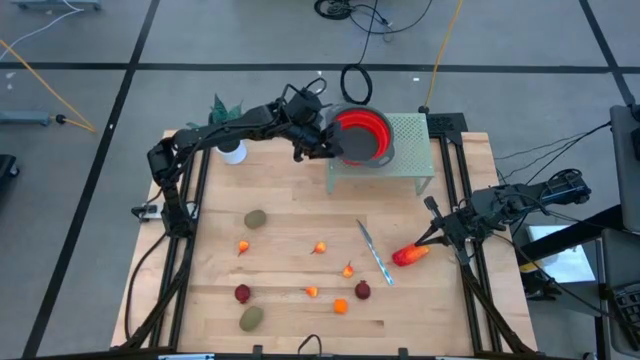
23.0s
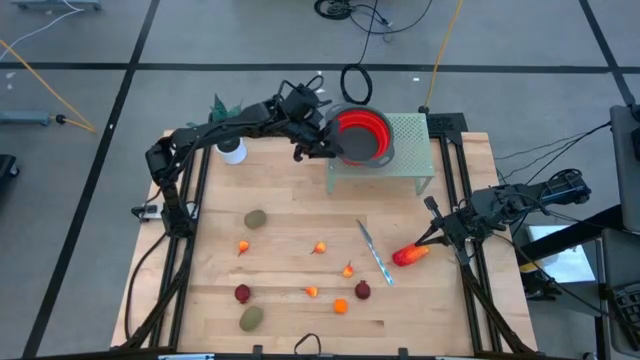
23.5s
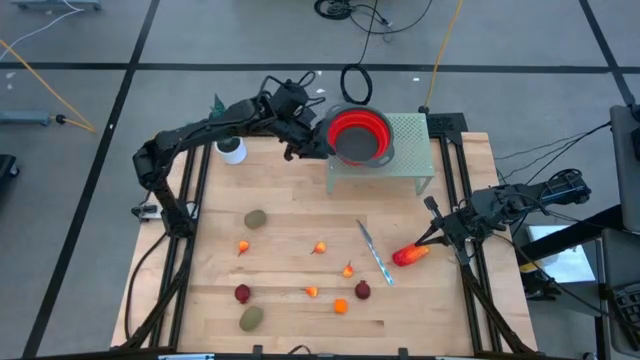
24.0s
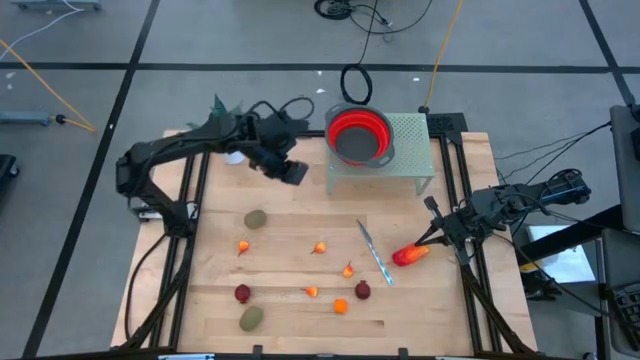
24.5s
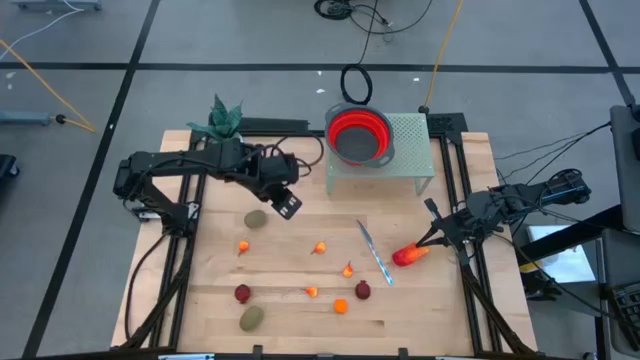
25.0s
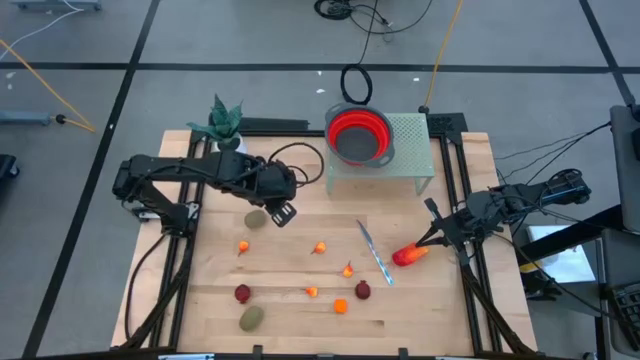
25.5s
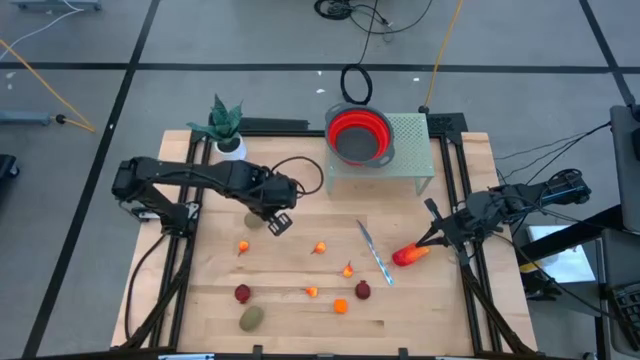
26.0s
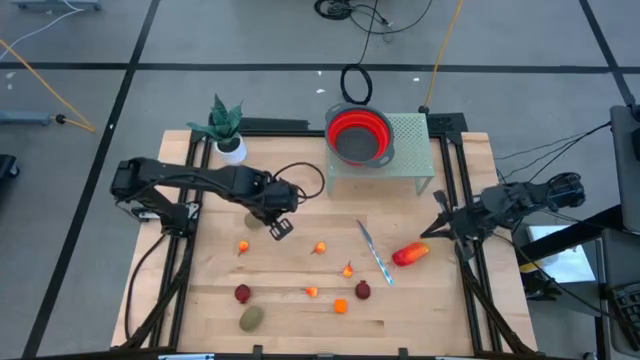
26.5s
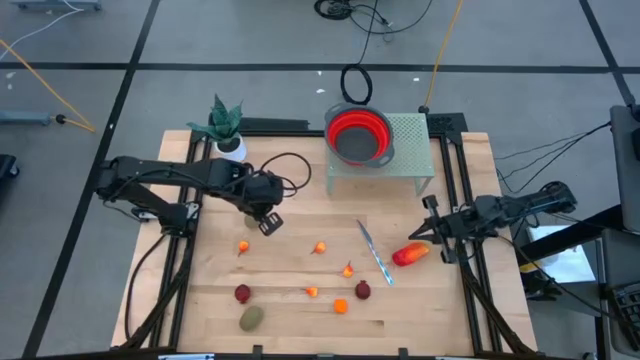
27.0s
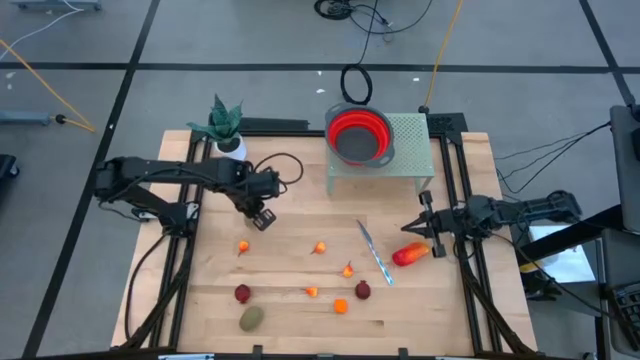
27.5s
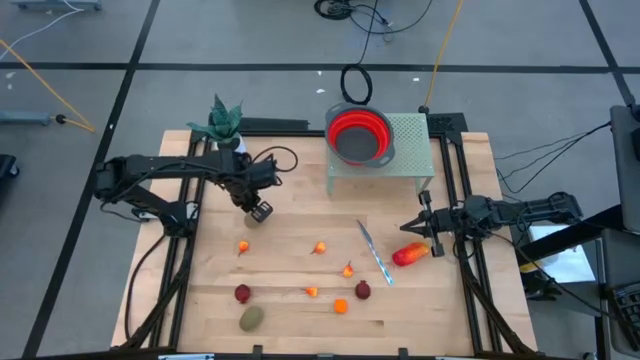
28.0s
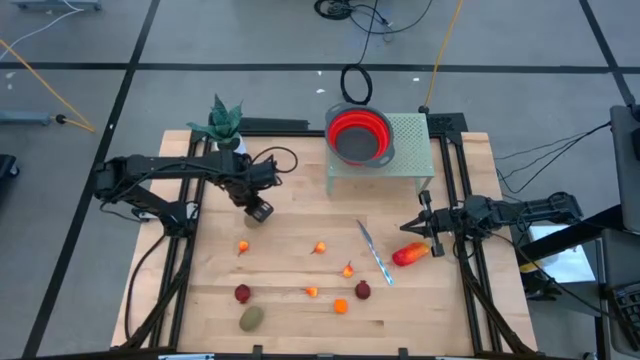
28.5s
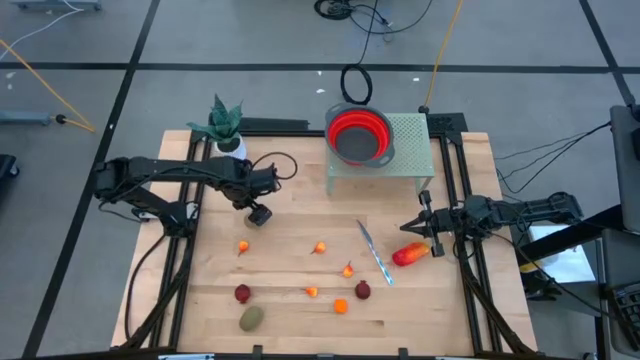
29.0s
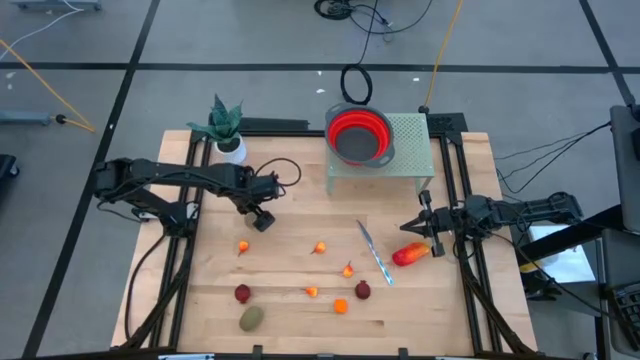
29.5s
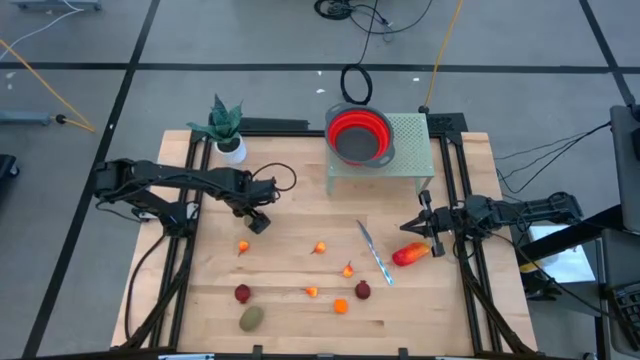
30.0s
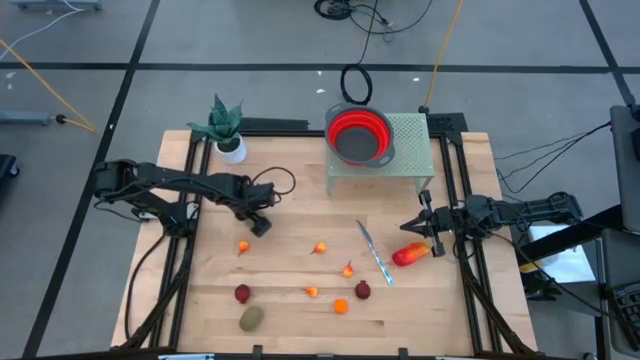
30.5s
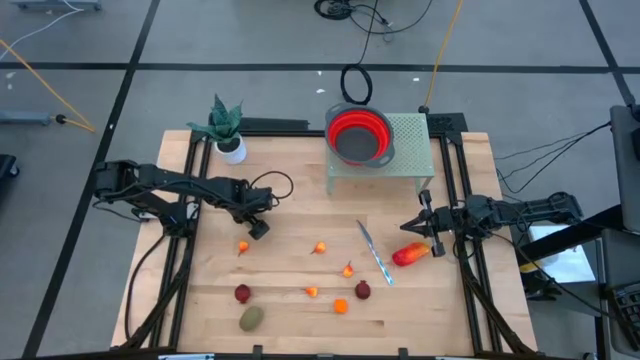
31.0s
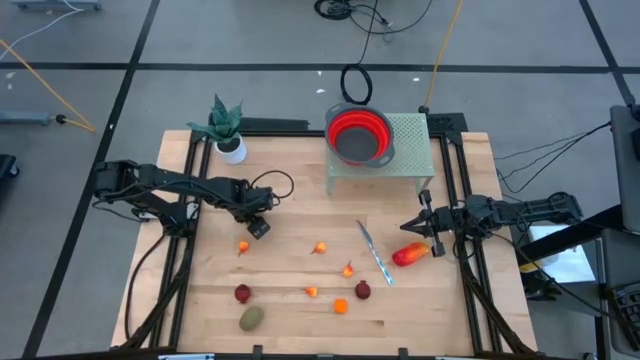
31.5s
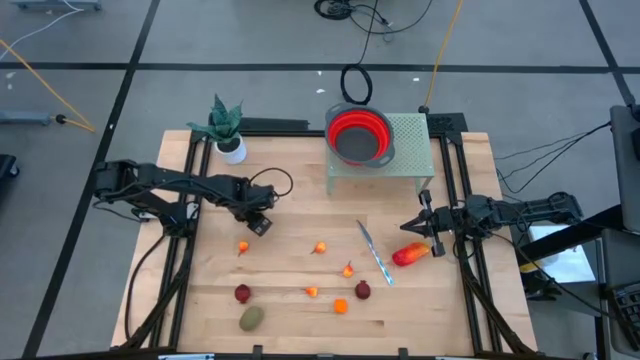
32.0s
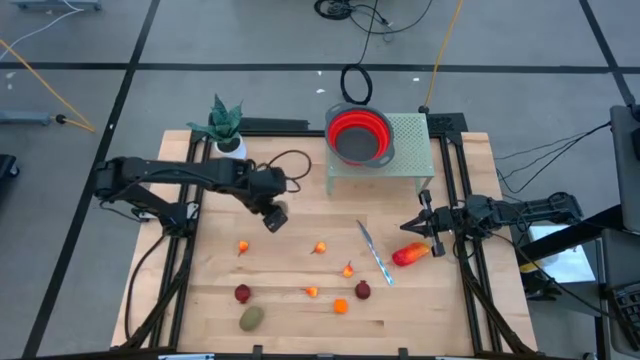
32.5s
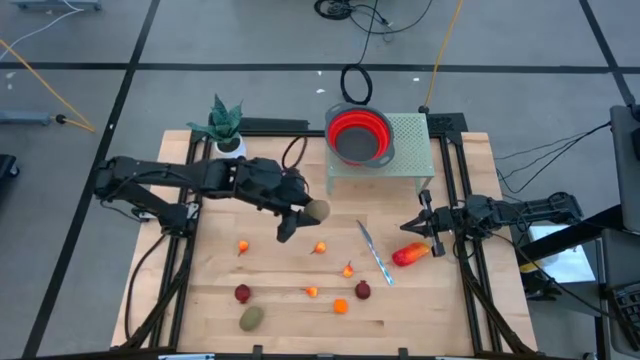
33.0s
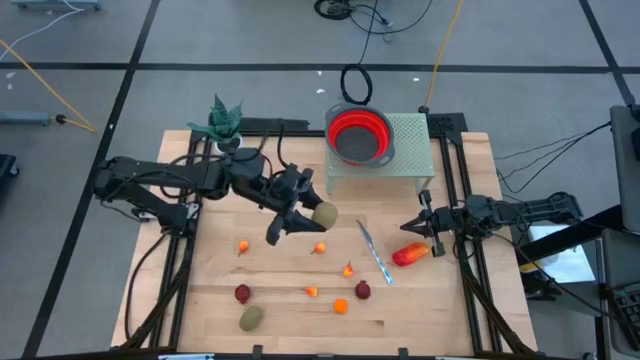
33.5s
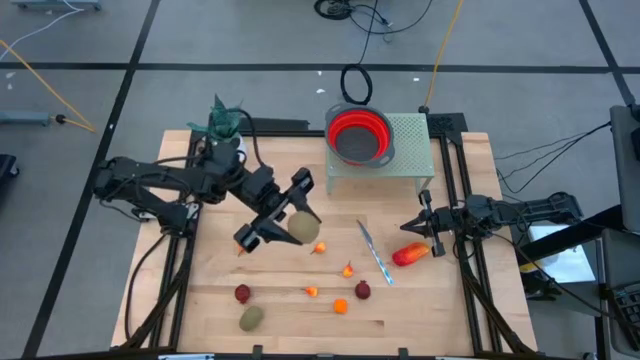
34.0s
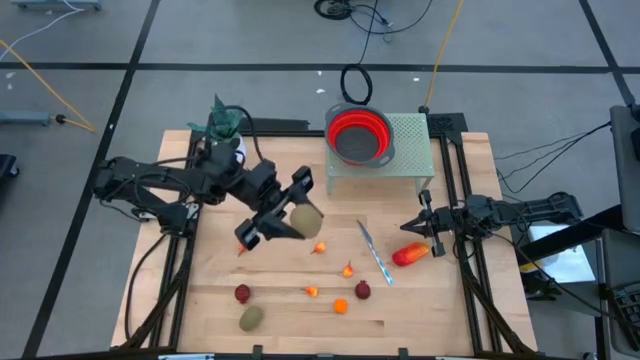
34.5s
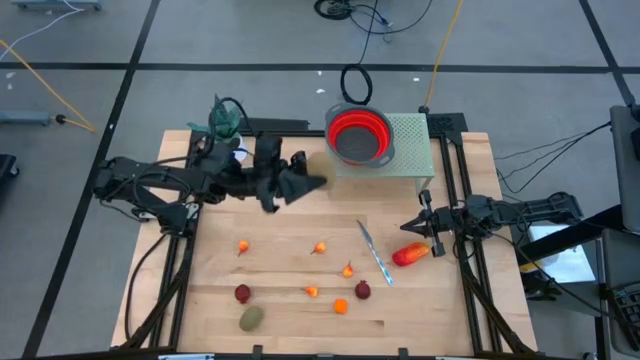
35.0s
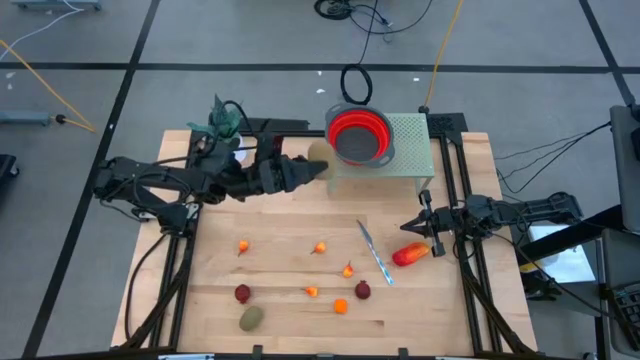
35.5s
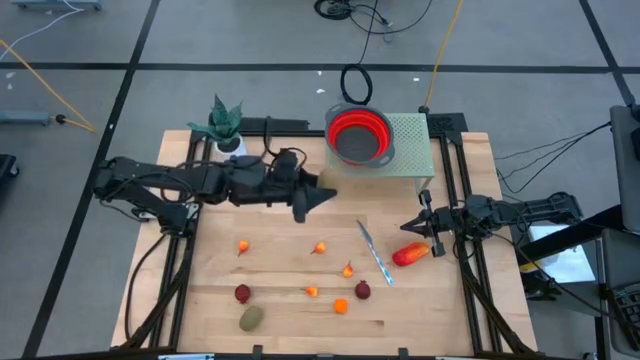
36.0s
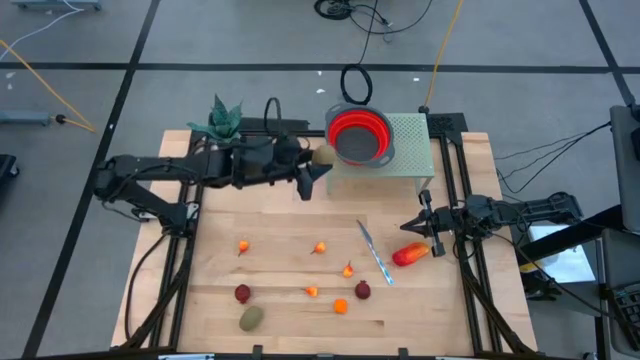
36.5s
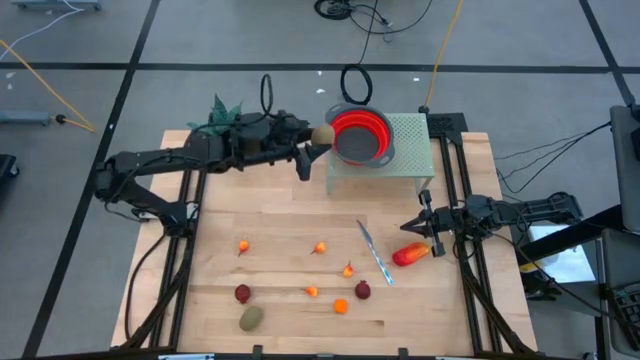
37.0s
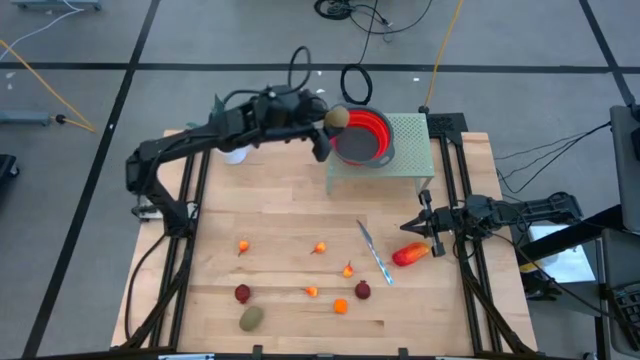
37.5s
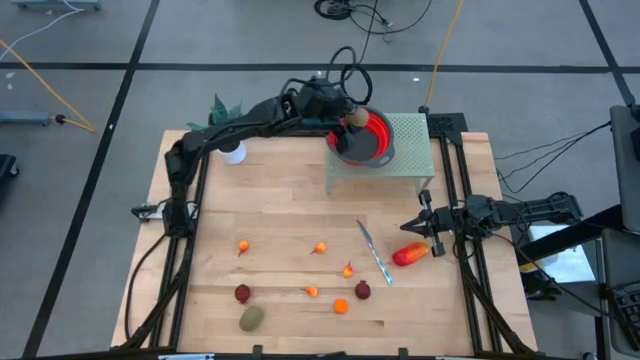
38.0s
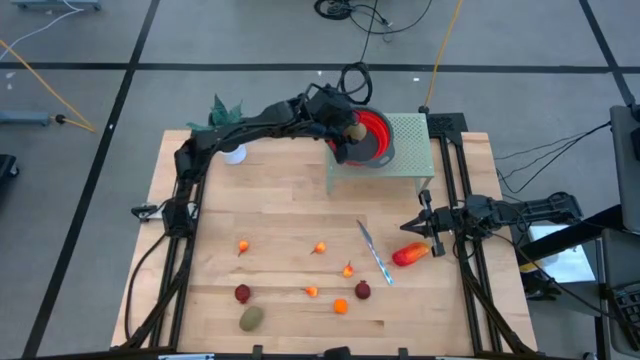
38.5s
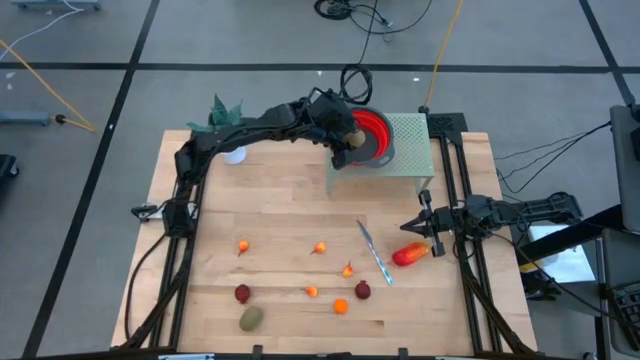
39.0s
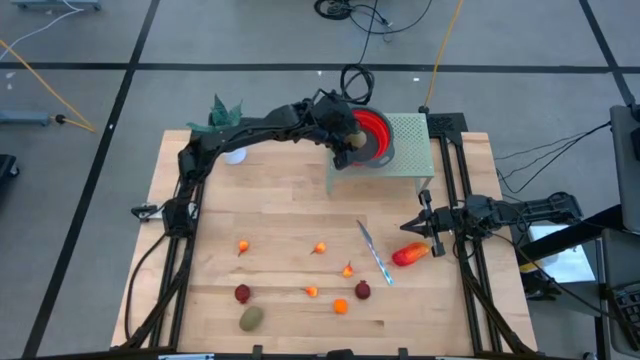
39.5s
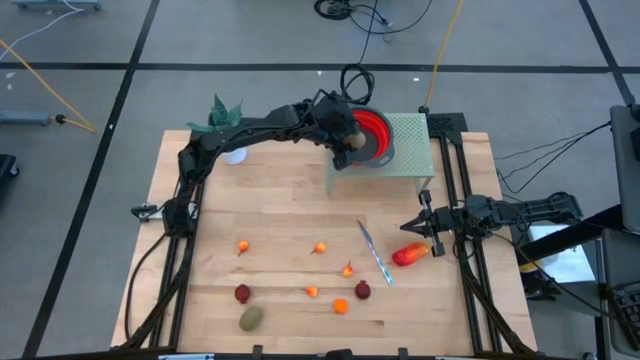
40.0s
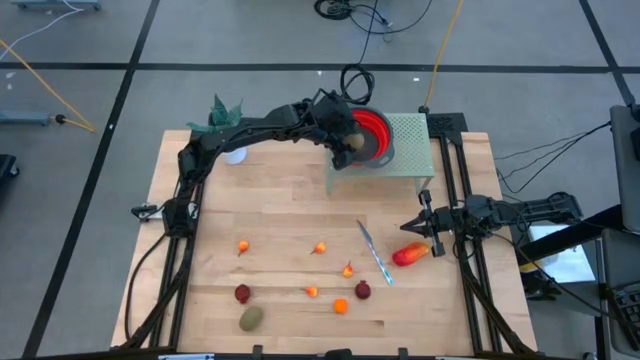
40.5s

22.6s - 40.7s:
Task: Pick & Place Fruit
Put the brown kiwi fruit into the red basket on the shelf

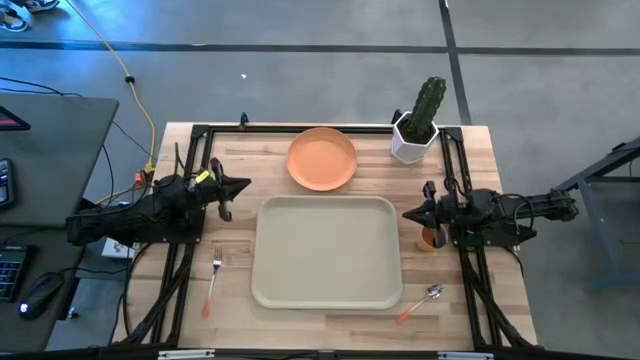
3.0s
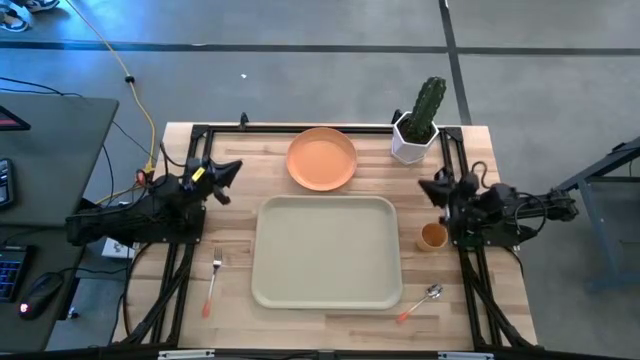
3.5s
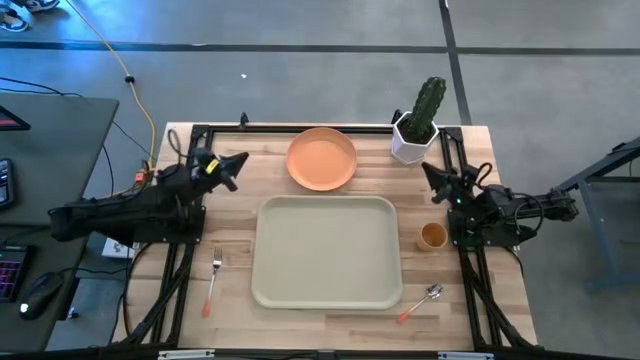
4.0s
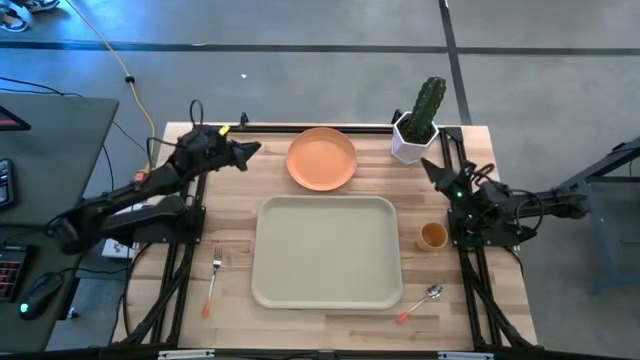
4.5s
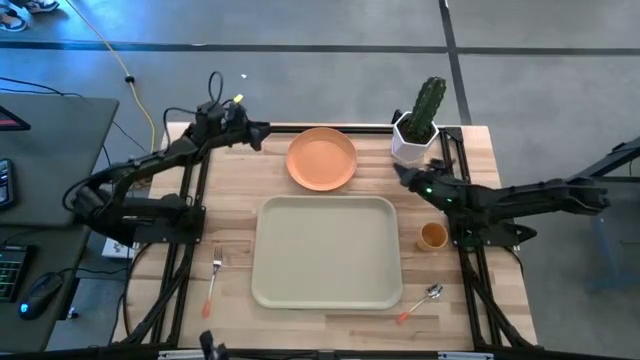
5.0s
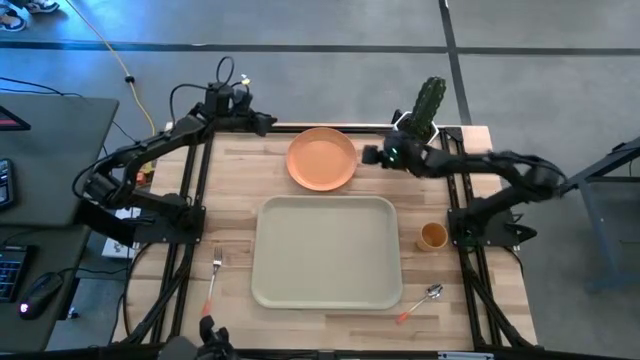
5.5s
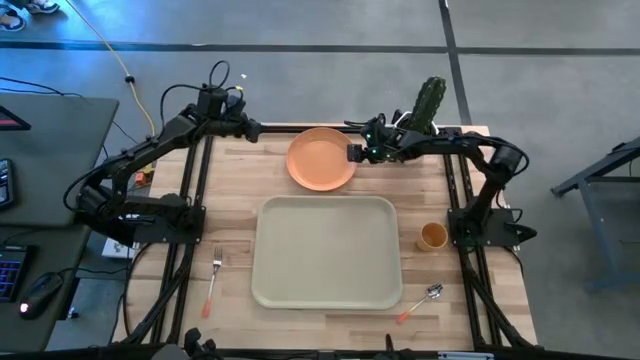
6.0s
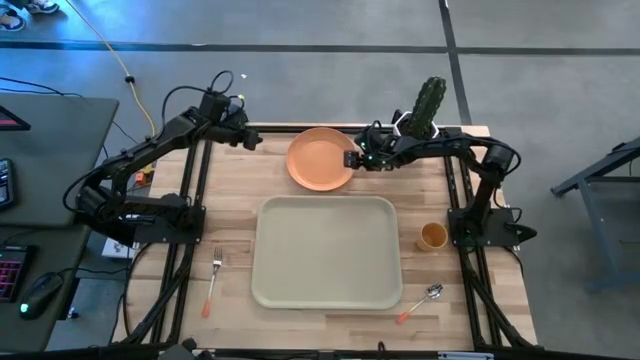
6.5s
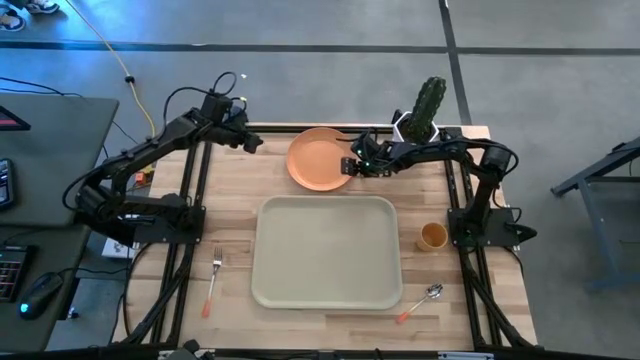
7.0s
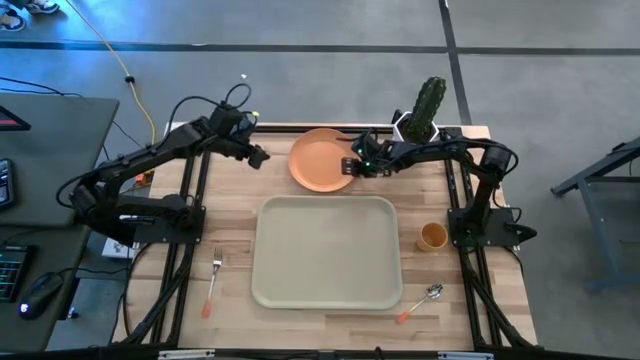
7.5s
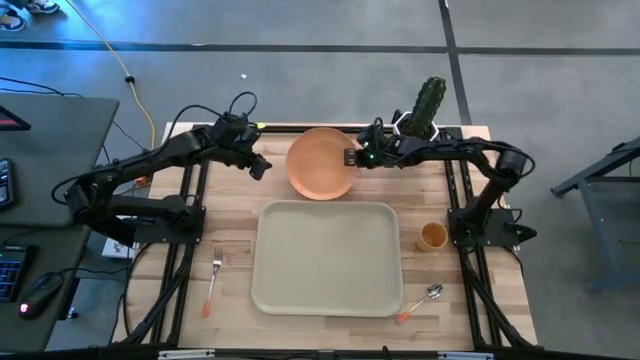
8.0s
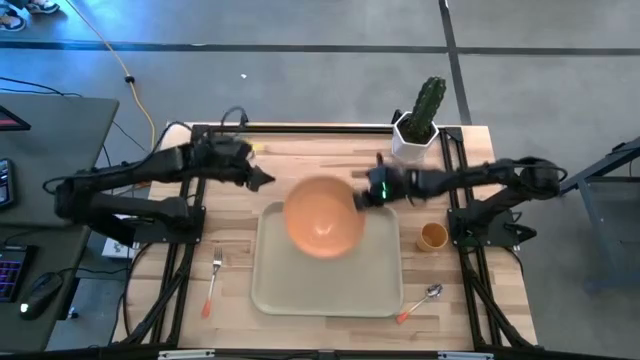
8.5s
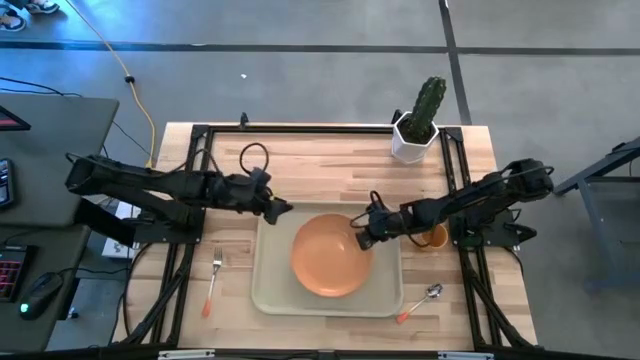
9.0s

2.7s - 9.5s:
Task: Pick and place plate/cup/fork/spoon on tray
Put the orange plate on the gray tray
